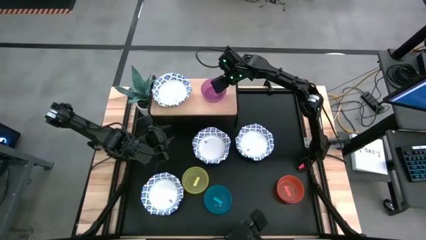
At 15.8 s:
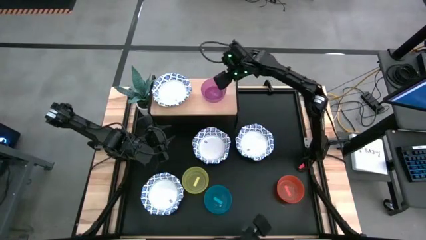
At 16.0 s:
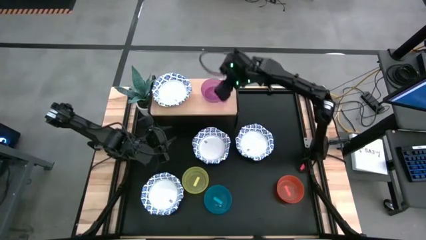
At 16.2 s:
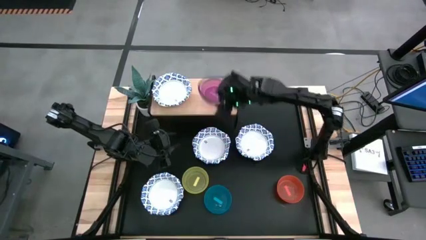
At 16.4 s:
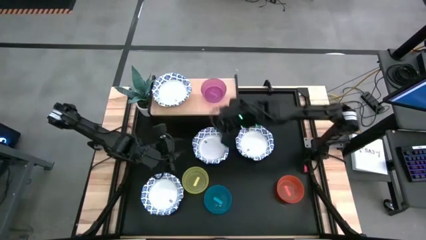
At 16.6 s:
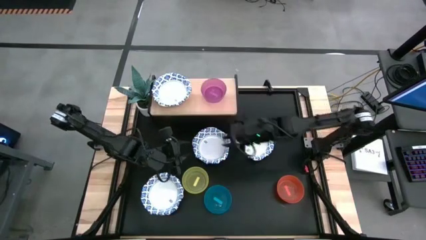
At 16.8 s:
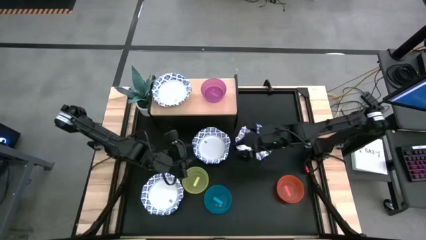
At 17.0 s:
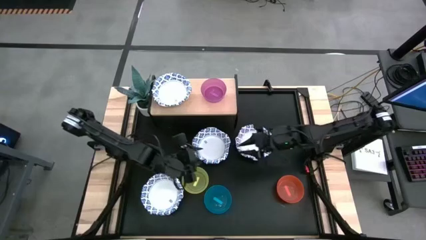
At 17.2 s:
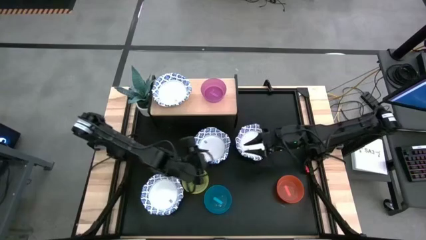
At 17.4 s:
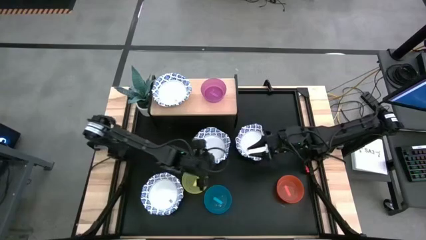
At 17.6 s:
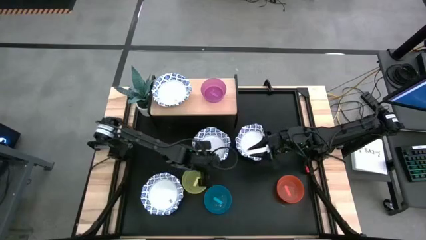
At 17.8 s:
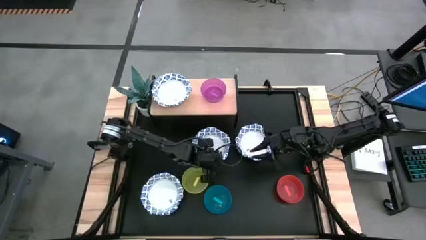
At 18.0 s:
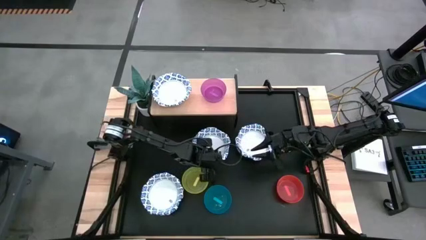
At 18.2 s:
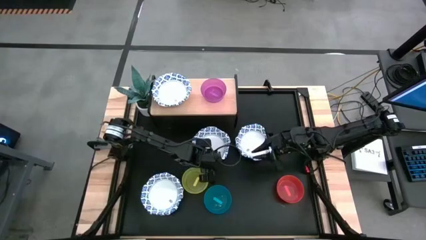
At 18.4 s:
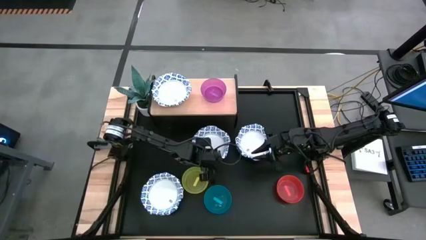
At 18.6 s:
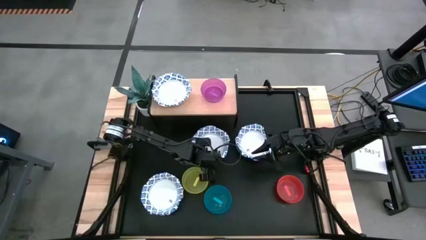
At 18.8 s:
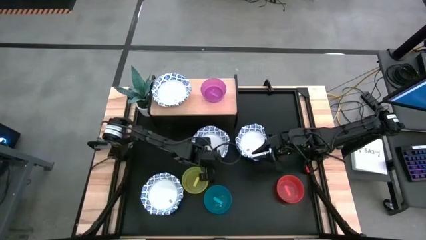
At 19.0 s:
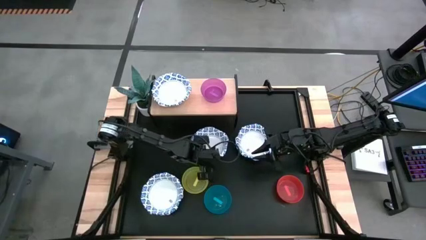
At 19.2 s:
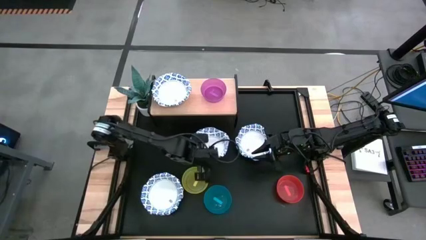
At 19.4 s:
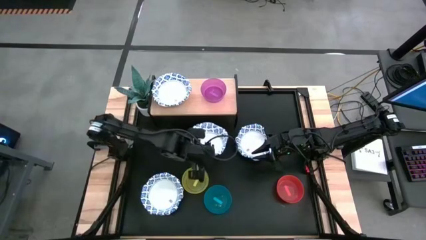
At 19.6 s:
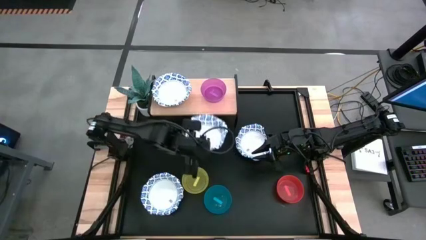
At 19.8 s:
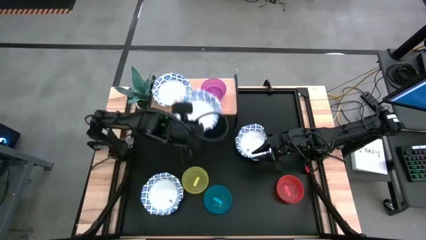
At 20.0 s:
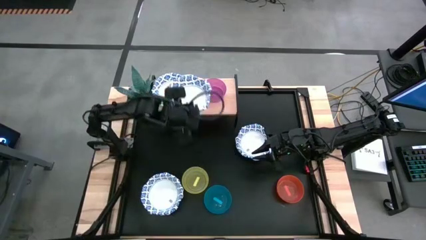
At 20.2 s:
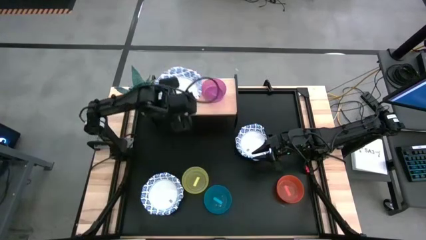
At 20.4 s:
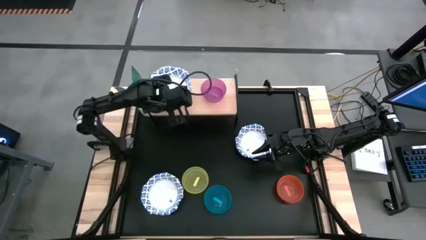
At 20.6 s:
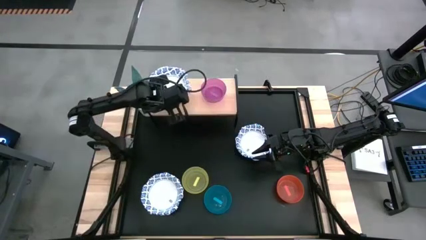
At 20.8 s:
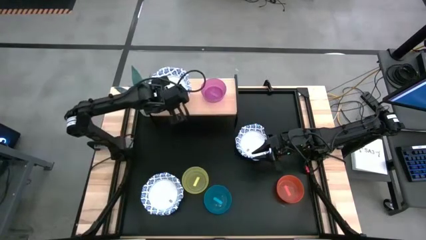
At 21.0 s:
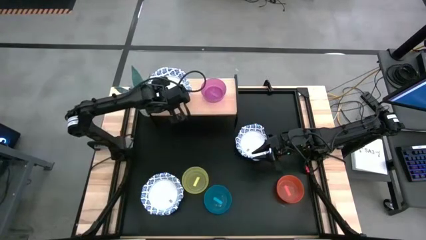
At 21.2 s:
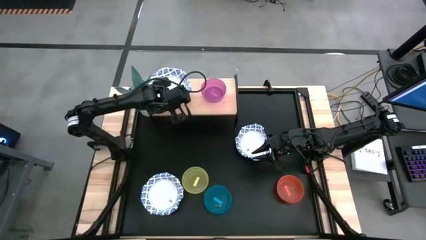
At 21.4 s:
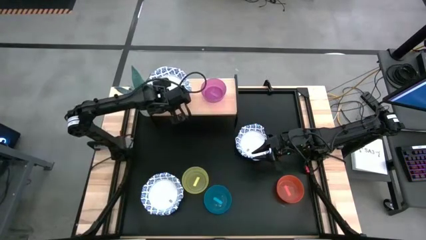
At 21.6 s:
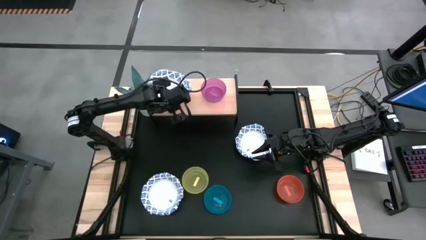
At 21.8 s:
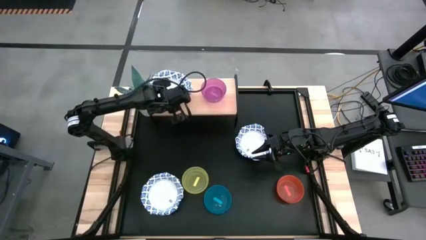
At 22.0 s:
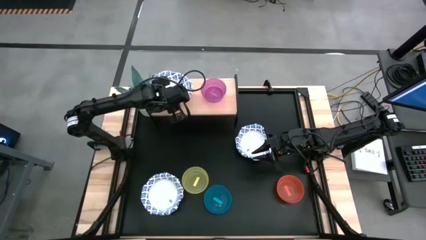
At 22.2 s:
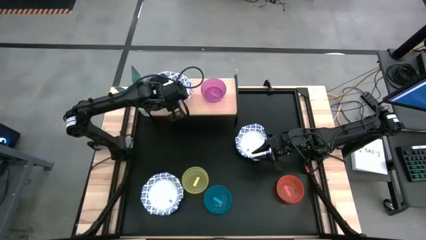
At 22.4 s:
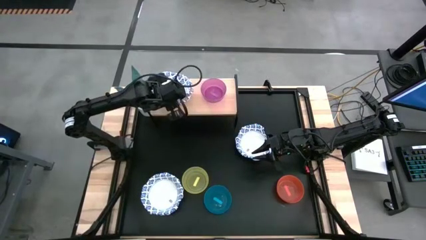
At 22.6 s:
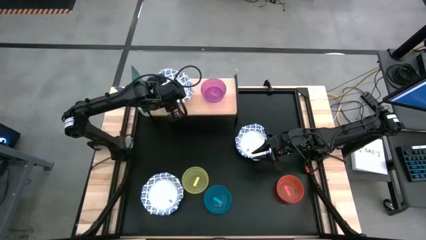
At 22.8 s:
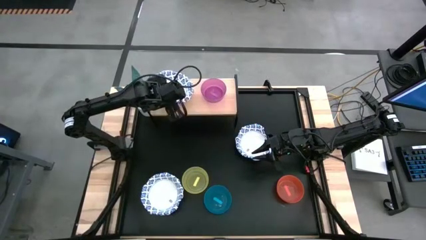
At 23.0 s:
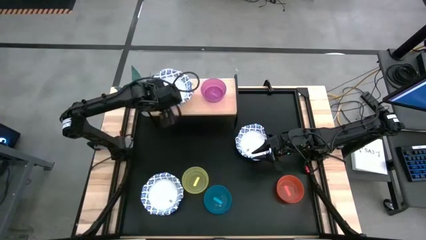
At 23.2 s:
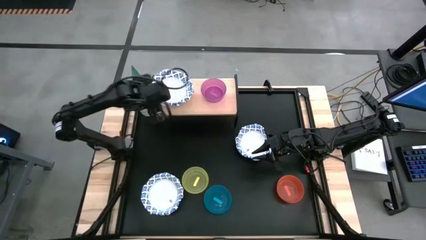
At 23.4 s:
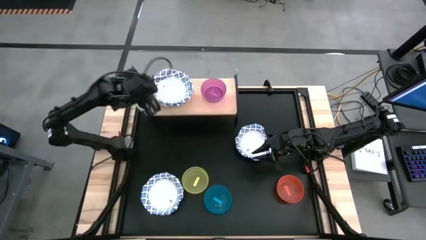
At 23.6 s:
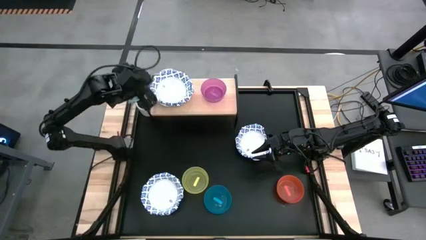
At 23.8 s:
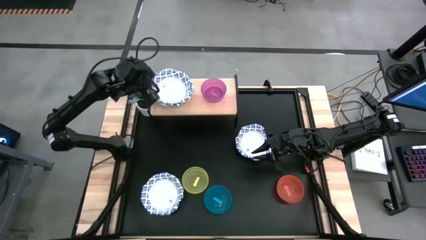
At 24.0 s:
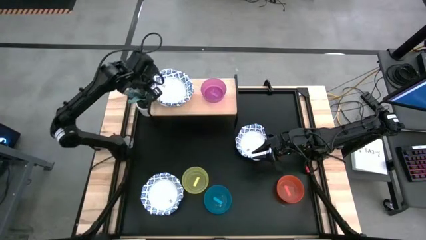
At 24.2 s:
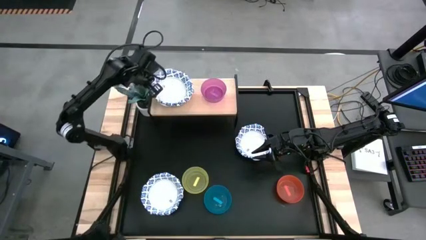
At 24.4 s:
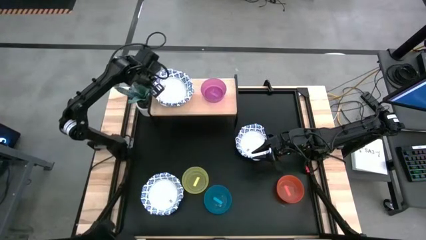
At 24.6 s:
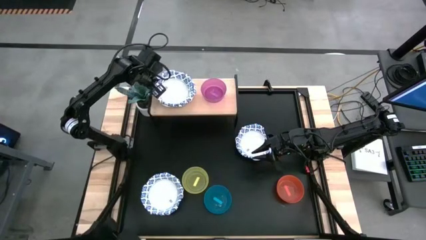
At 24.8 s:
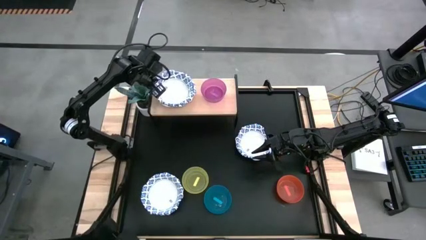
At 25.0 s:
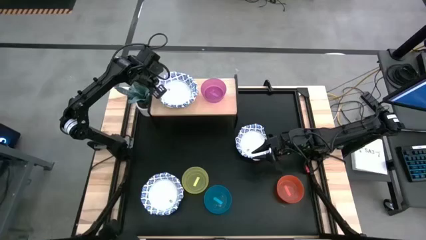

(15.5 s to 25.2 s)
Task: Place and stack bowls onto a shelf
Stack the white patterned bowl on top of the white patterned bowl on the shelf

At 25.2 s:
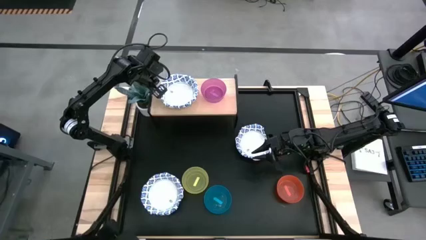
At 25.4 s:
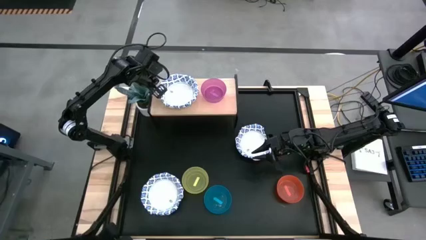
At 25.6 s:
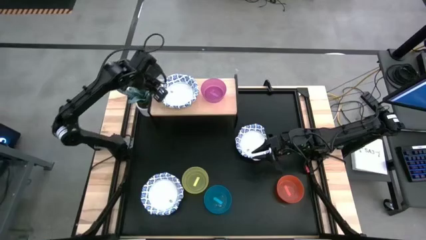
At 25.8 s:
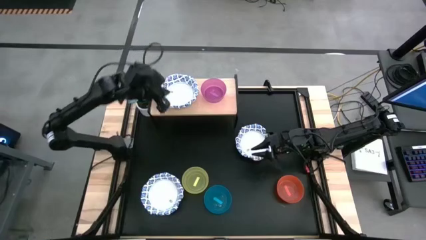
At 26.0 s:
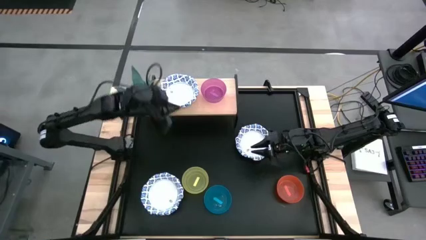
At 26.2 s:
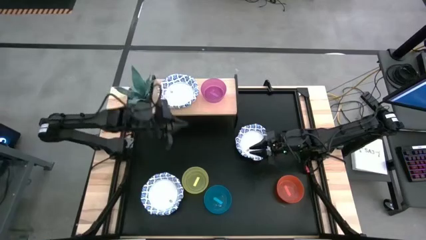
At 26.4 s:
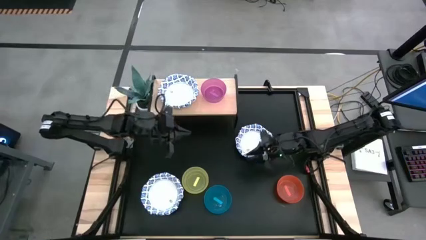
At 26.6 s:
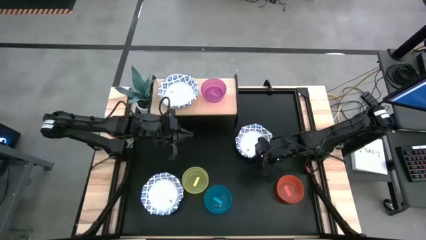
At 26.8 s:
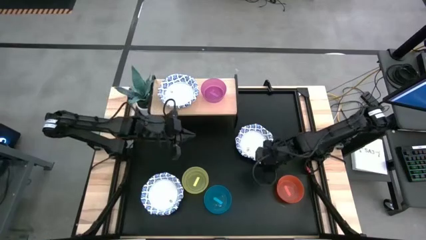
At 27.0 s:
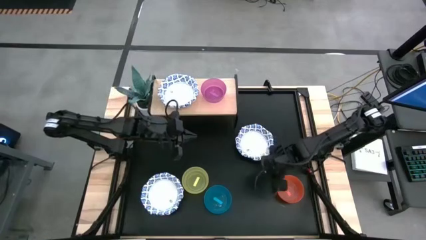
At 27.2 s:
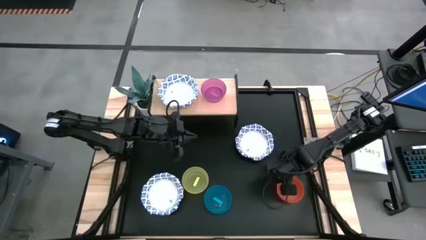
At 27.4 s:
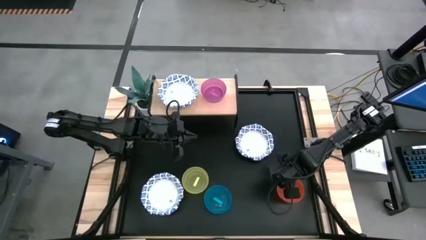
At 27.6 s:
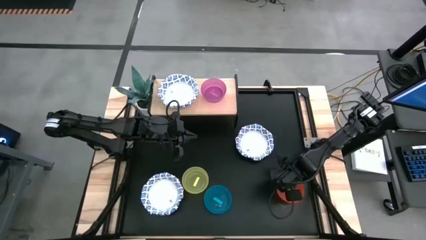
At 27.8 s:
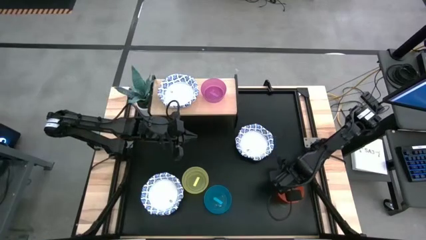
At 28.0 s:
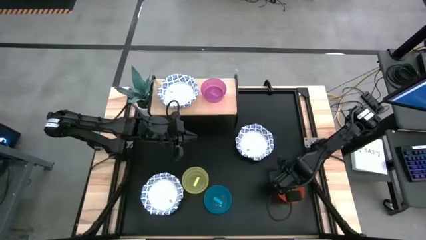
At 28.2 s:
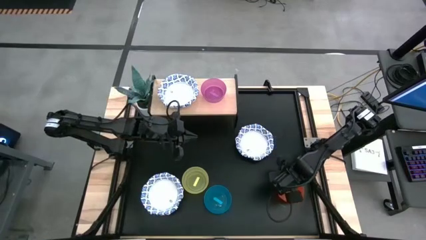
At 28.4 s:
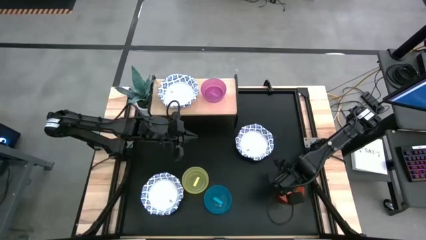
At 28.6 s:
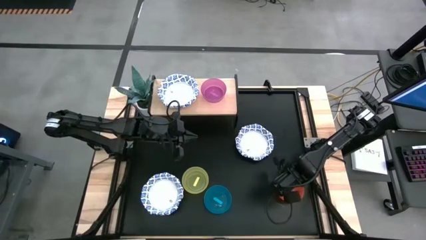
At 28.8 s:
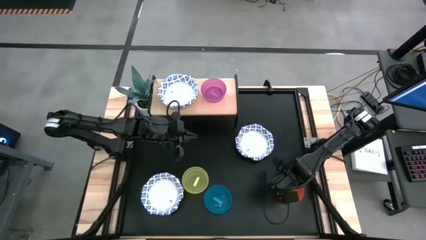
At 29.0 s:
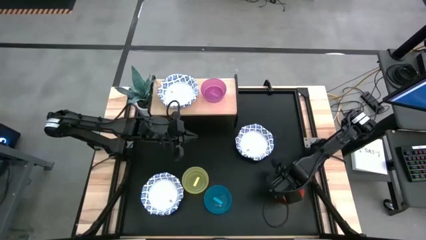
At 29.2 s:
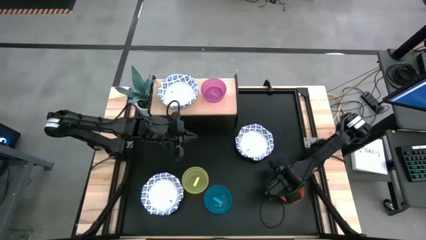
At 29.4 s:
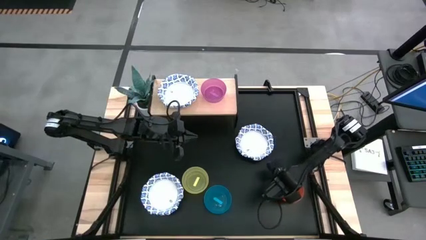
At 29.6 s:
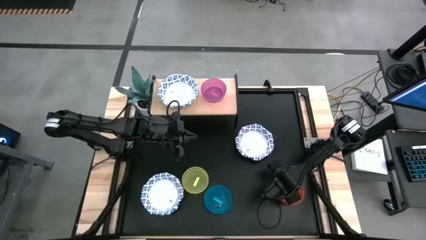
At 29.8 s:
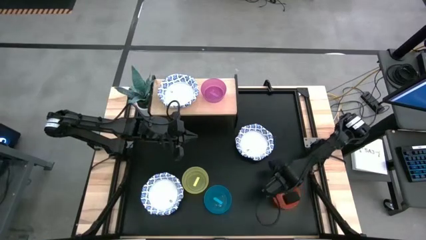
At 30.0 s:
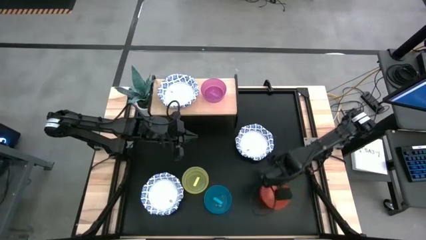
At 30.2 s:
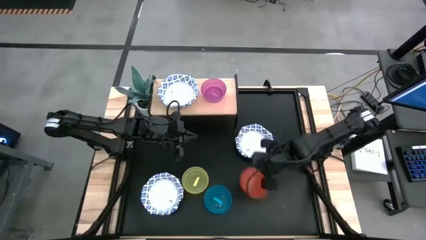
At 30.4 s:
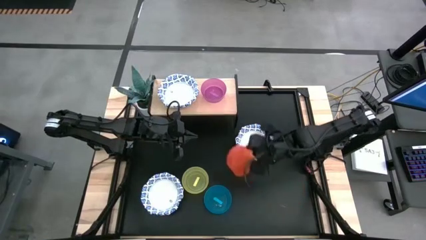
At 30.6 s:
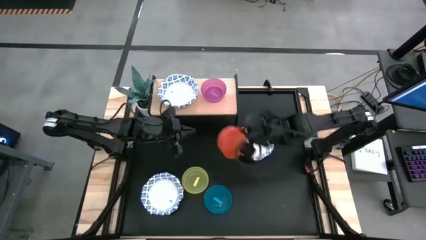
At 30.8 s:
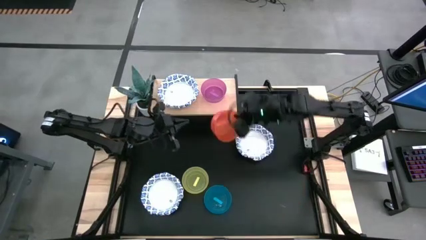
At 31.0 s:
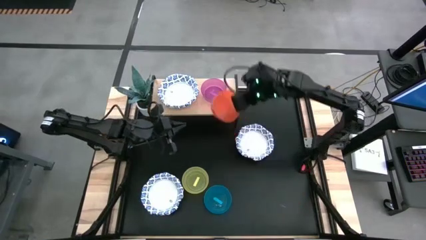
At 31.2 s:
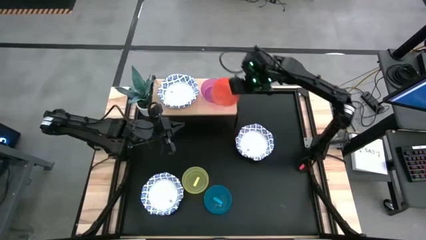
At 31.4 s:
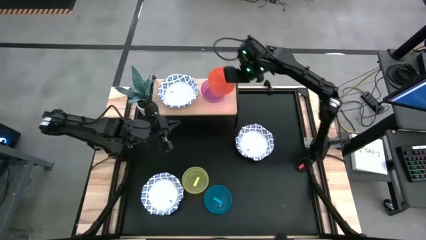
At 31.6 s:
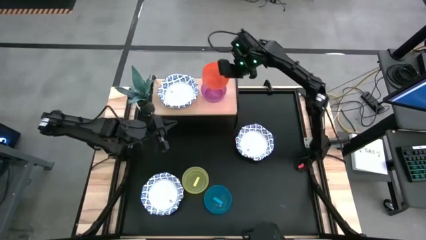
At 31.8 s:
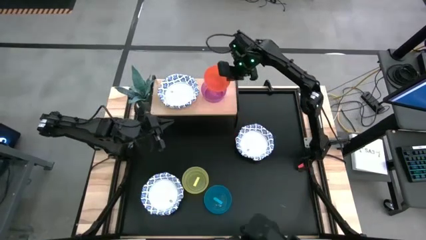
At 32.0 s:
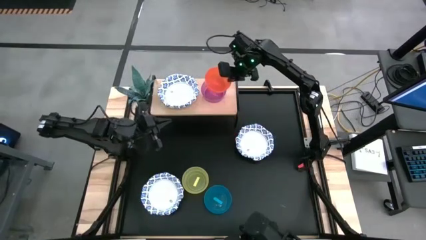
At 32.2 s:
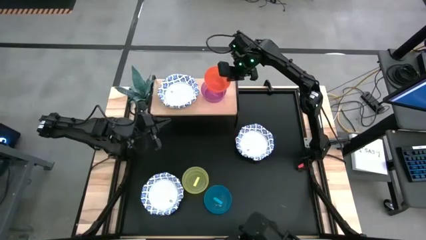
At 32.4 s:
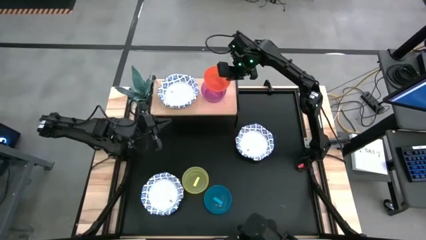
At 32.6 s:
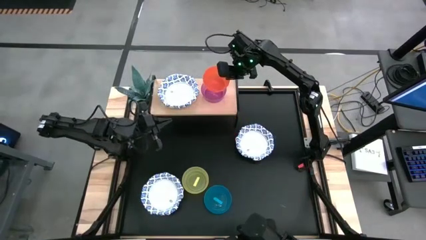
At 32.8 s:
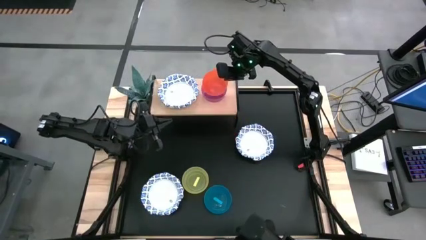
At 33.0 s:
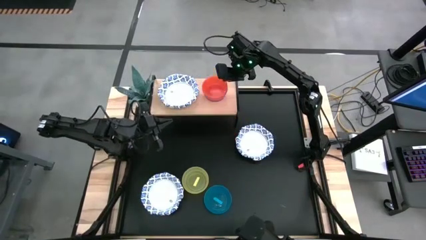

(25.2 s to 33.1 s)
Stack the orange bowl on top of the purple bowl on the shelf
